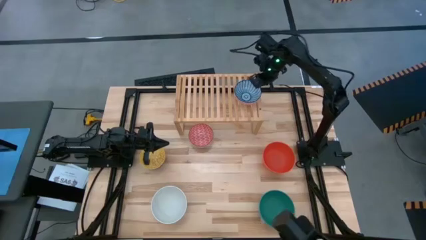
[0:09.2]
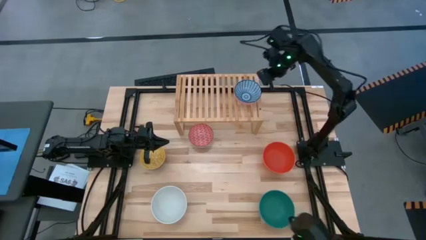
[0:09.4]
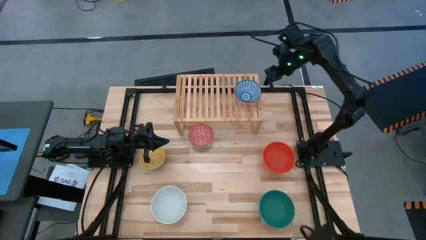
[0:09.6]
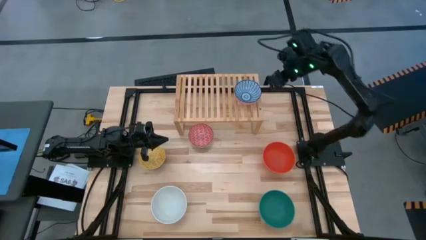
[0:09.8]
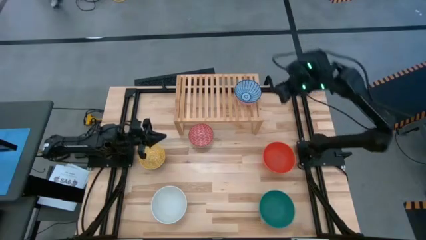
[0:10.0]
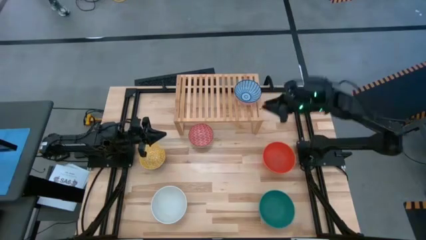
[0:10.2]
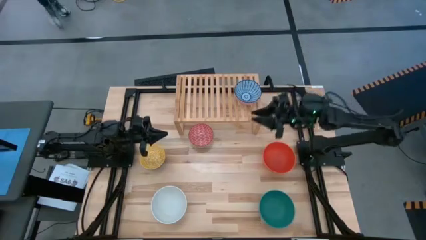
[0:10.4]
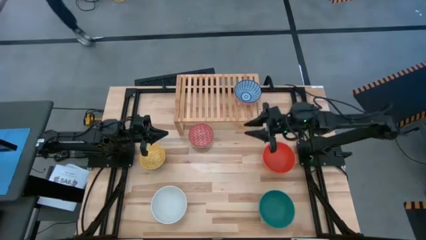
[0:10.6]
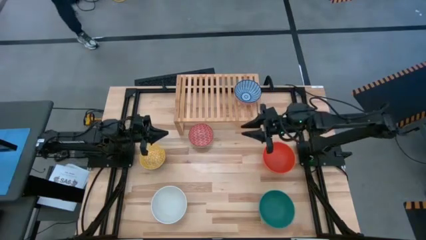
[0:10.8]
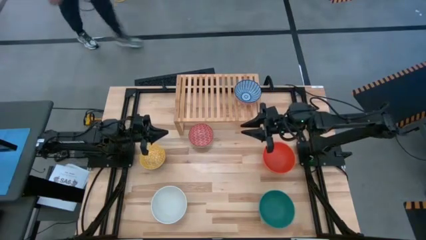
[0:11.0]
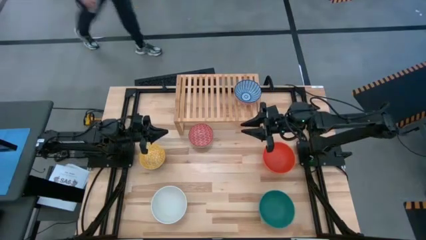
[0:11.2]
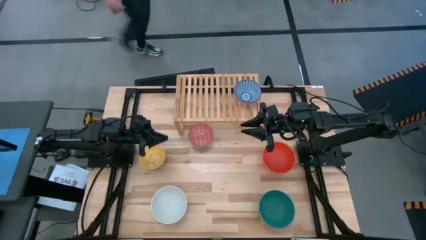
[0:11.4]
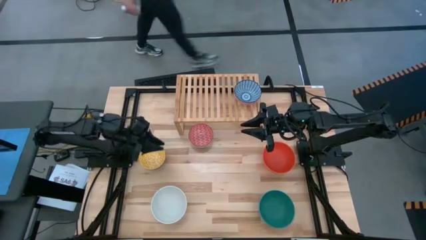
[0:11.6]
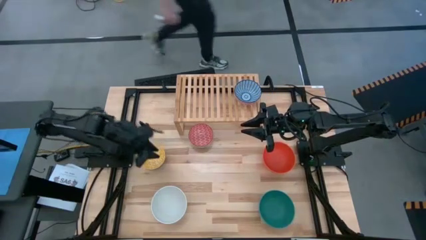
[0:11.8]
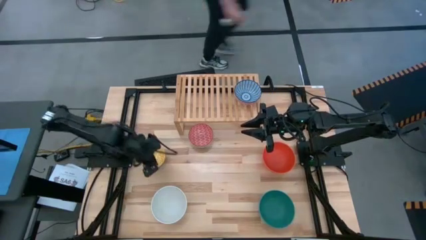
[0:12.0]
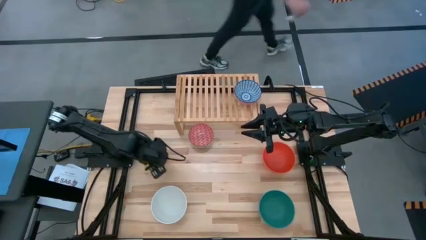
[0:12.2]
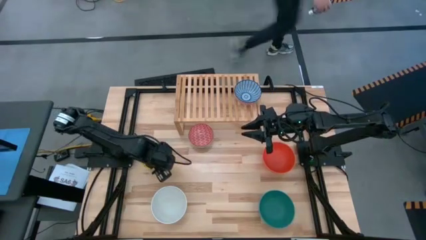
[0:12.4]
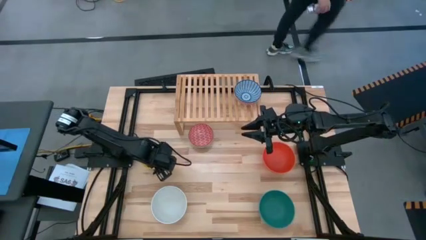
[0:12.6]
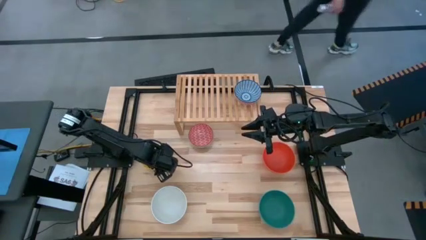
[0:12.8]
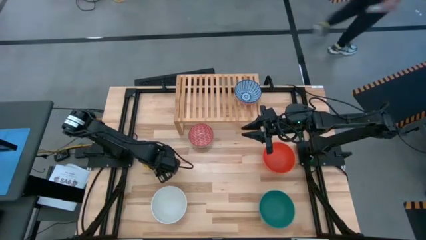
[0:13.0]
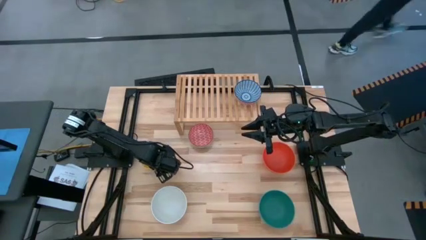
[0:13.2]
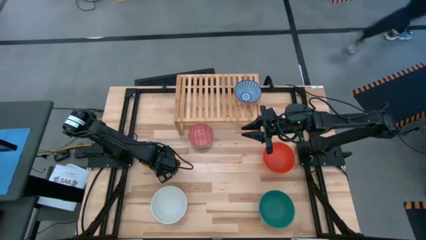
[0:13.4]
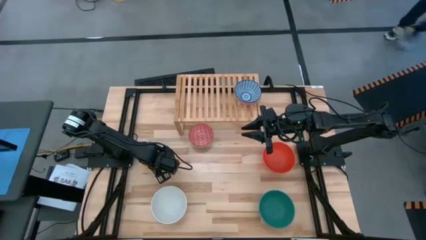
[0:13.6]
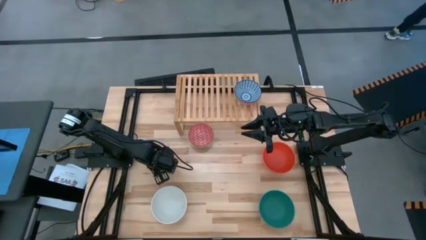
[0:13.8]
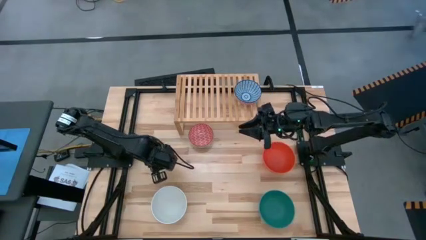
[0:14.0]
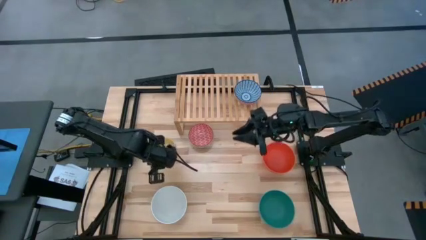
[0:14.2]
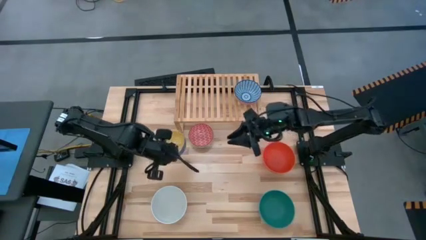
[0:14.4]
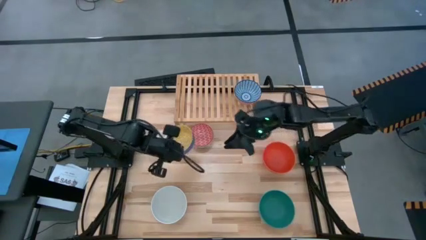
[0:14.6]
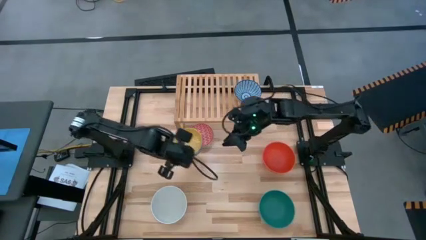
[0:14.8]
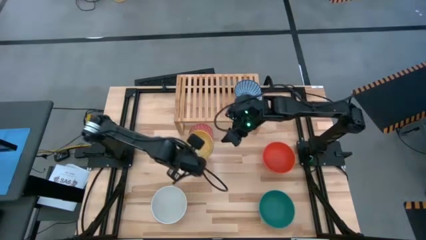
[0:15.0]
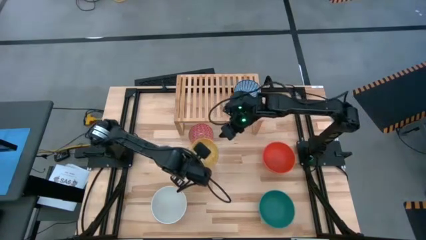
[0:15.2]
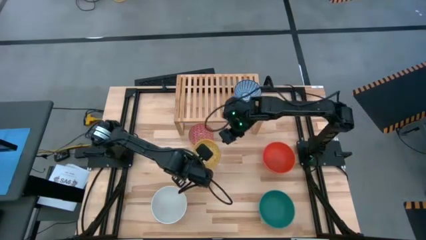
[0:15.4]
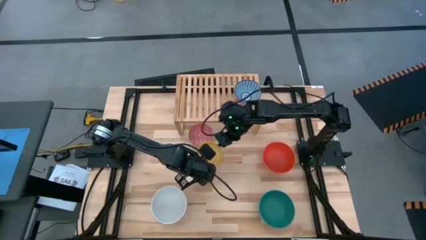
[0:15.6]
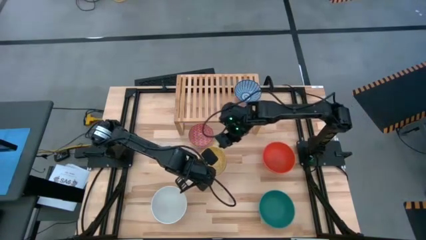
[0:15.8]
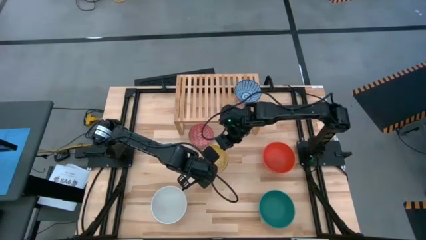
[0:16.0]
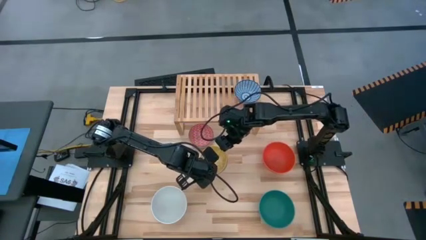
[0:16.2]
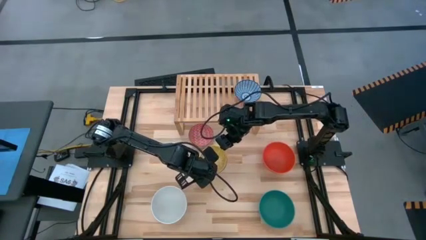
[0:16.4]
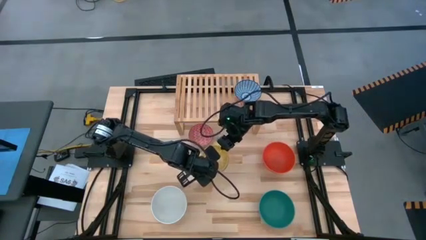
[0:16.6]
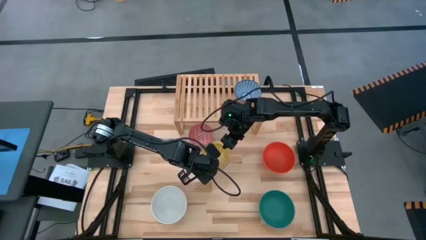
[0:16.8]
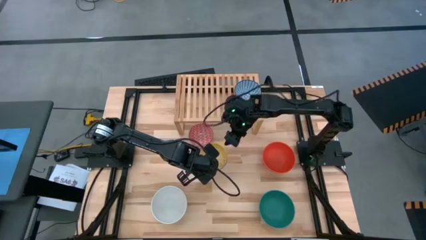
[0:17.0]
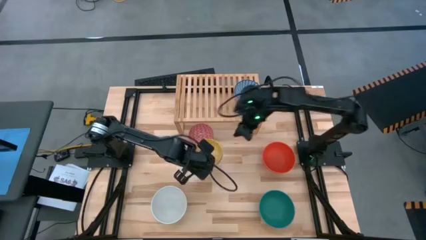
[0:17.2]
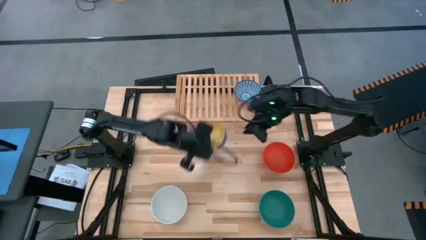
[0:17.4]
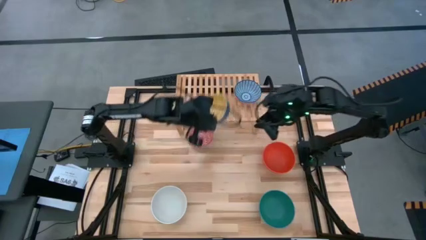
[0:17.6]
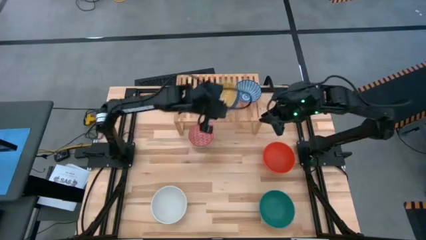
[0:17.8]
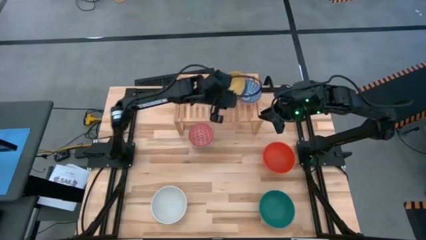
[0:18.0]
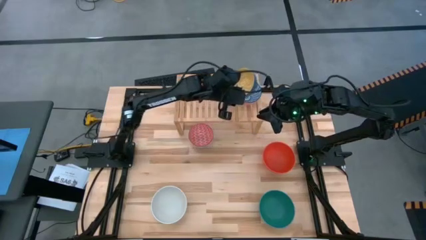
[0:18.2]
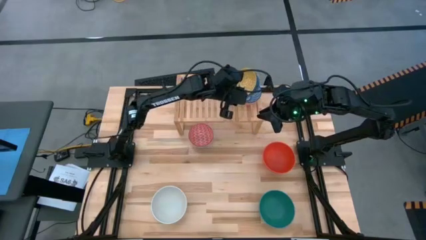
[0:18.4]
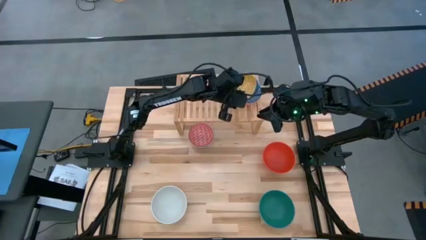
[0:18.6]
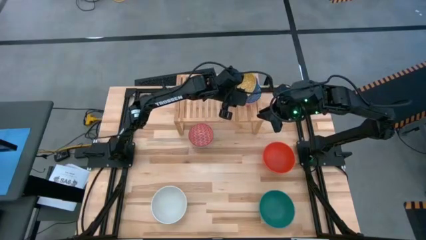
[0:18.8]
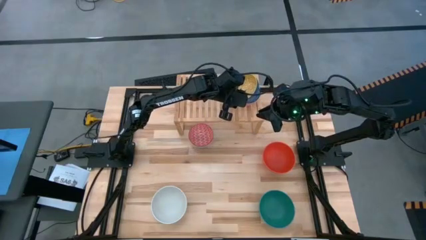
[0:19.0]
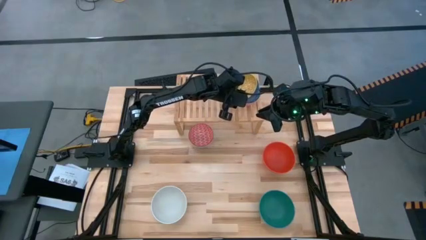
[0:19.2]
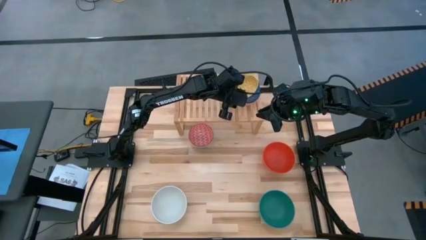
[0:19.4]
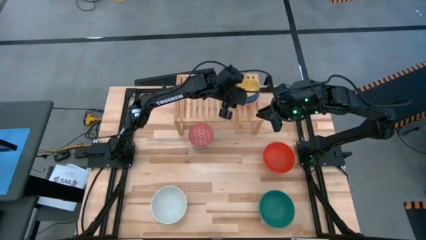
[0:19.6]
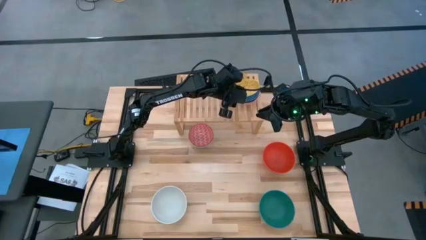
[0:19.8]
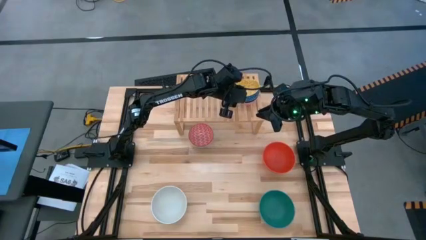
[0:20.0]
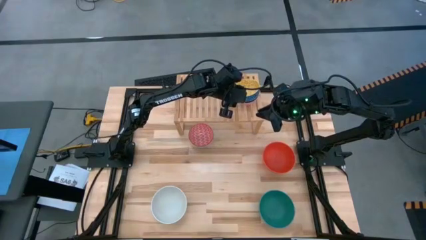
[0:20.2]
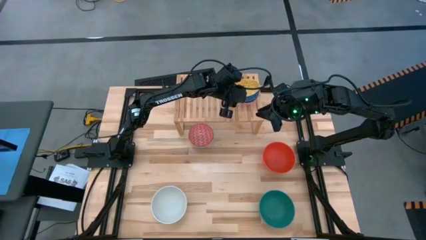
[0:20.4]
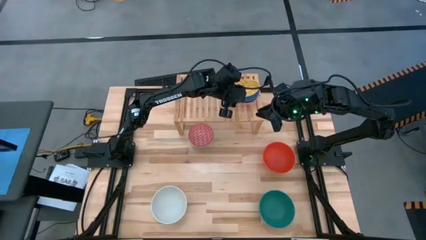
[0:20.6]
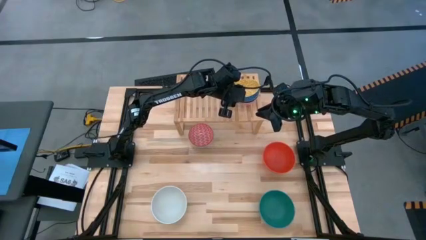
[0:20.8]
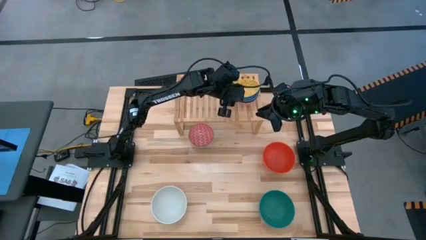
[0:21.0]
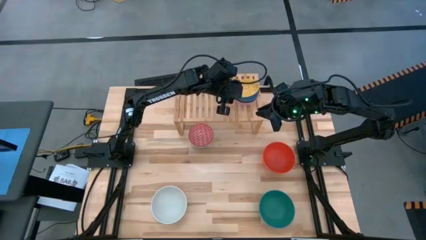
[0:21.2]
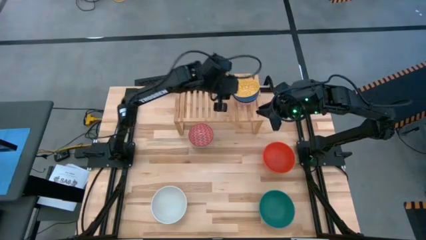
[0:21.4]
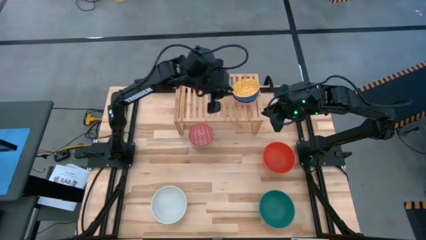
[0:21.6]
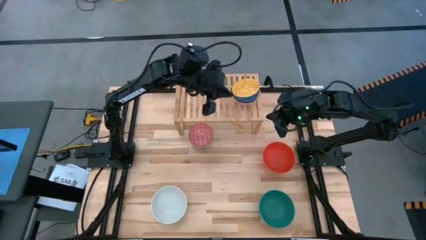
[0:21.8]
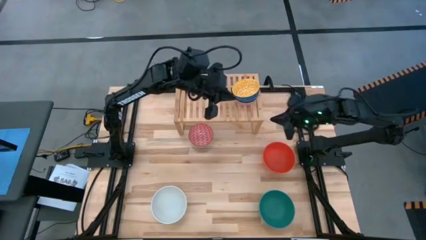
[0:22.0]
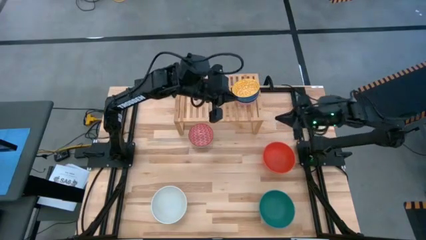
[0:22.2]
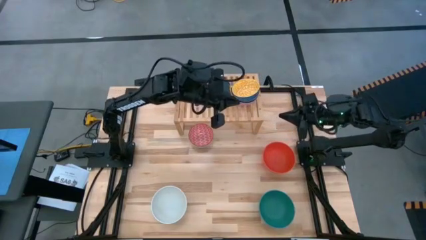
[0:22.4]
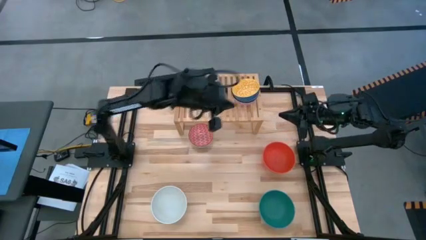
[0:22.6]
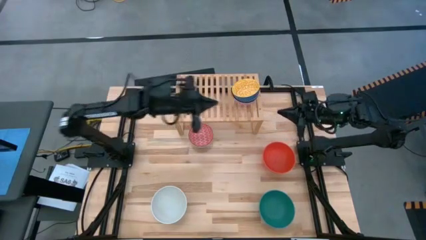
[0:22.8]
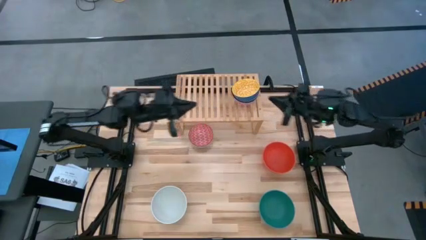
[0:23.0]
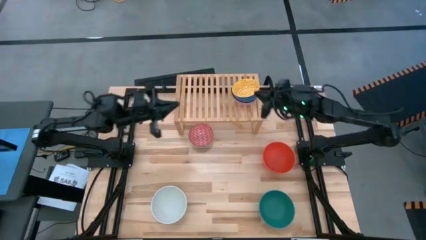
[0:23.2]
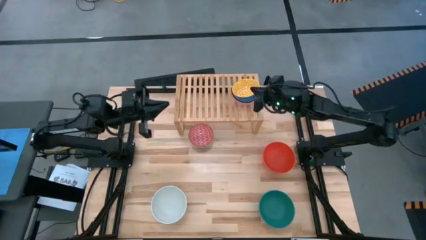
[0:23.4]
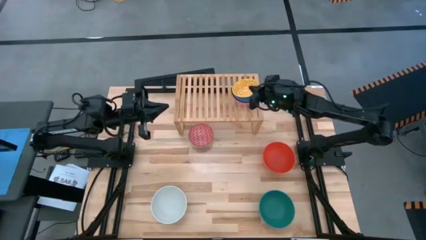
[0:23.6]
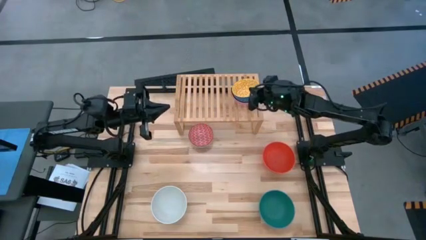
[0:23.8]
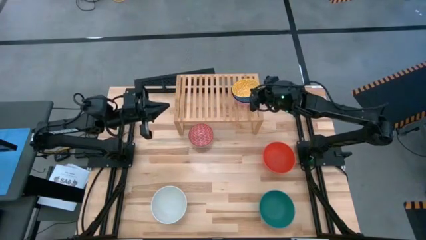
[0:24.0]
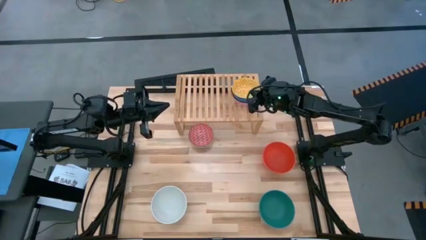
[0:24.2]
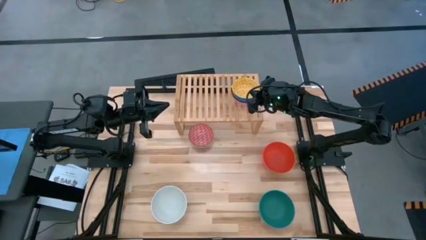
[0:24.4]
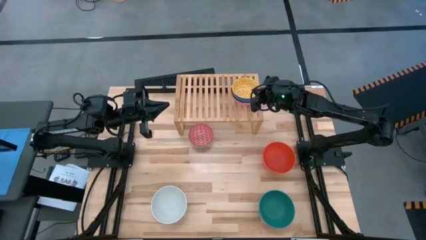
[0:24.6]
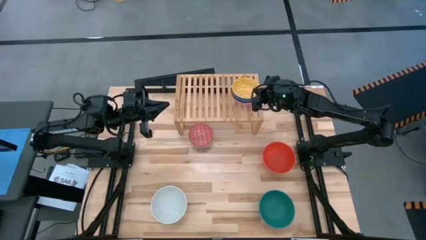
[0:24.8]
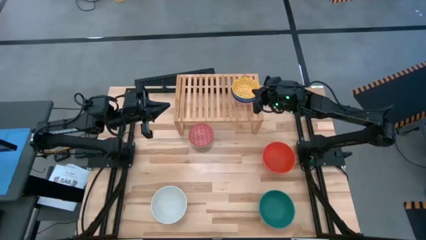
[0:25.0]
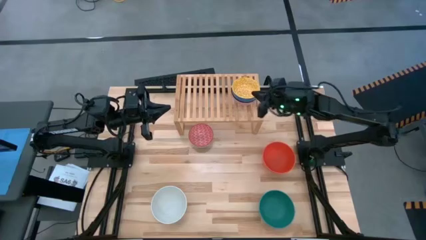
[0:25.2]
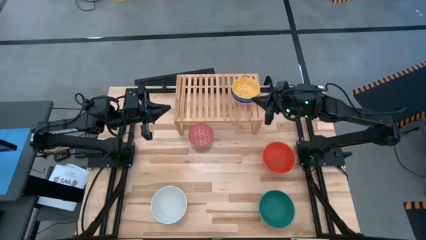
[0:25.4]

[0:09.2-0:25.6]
Task: Place and stack bowls onto a shelf
Stack the small yellow bowl on top of the other small blue bowl on the shelf
